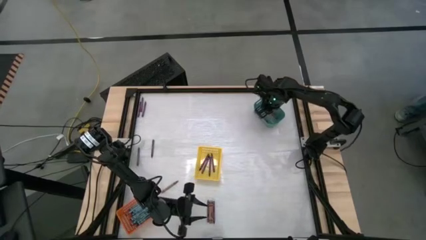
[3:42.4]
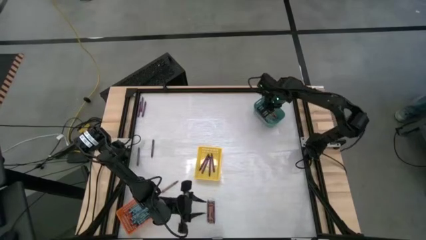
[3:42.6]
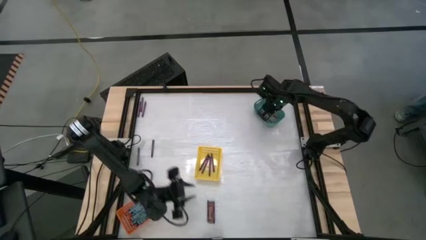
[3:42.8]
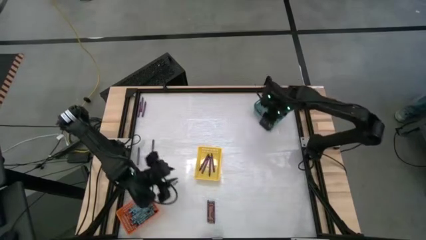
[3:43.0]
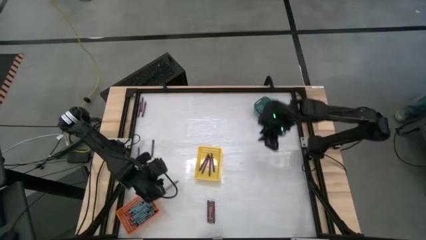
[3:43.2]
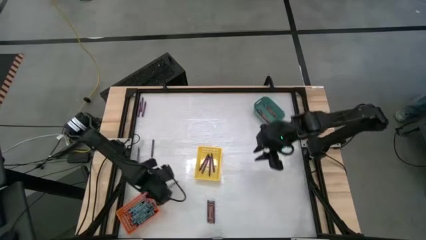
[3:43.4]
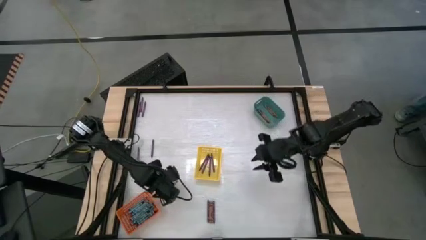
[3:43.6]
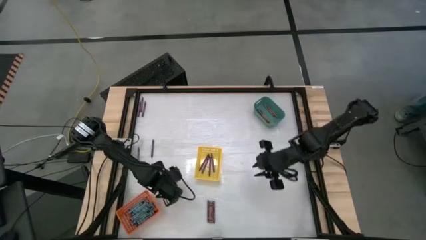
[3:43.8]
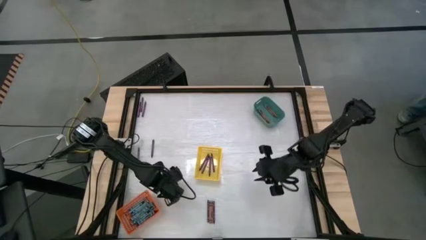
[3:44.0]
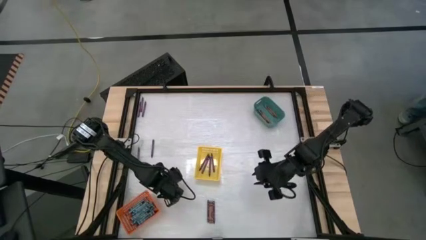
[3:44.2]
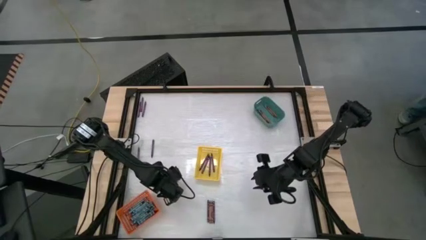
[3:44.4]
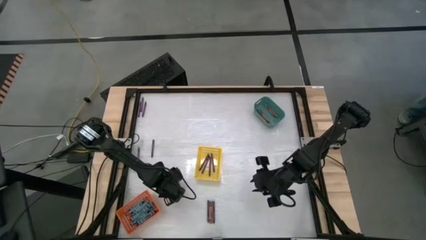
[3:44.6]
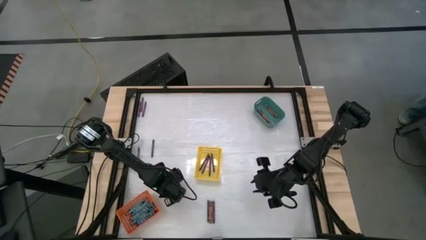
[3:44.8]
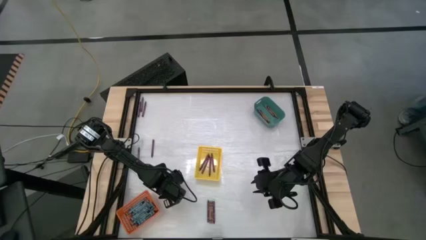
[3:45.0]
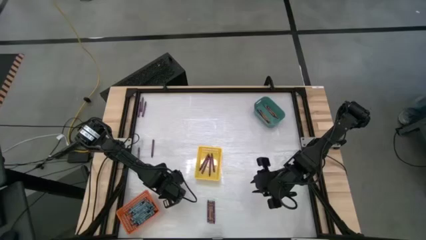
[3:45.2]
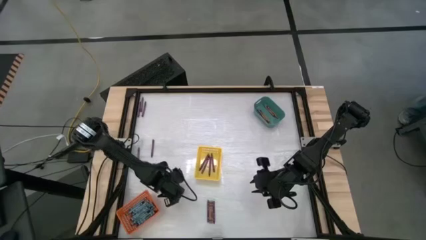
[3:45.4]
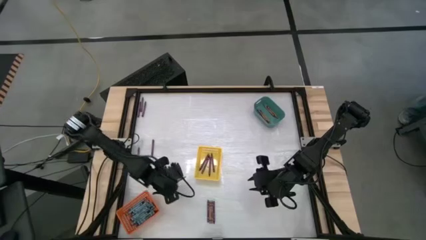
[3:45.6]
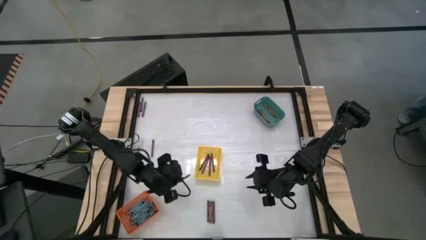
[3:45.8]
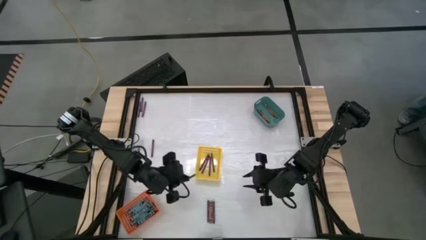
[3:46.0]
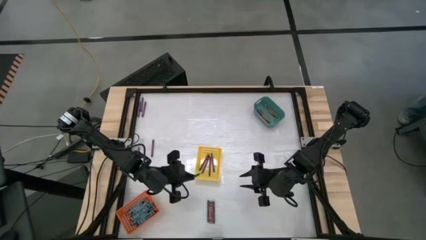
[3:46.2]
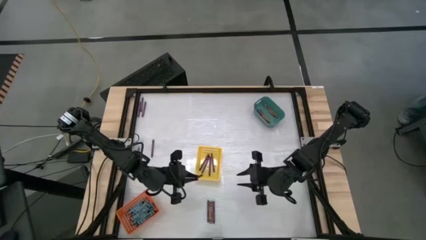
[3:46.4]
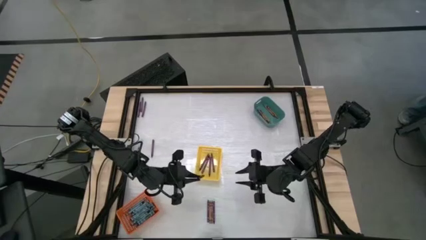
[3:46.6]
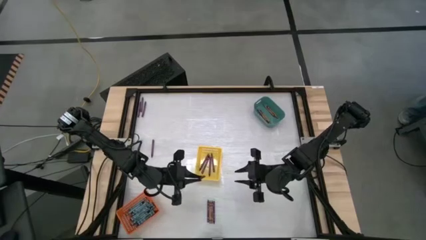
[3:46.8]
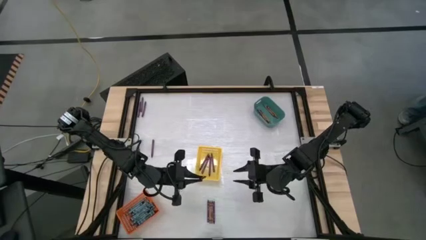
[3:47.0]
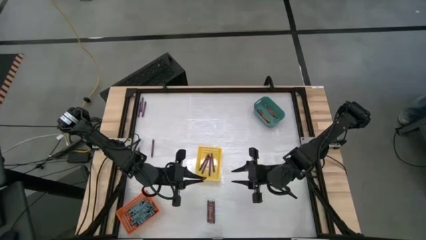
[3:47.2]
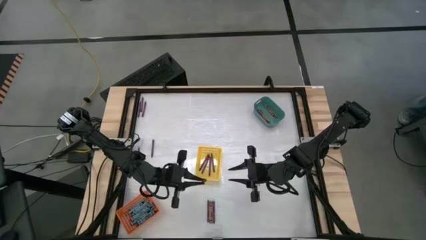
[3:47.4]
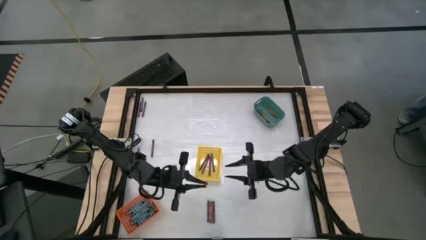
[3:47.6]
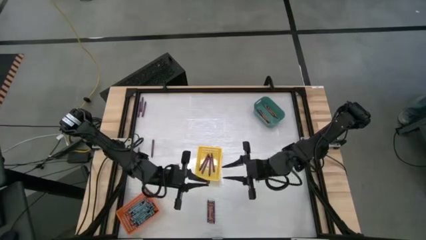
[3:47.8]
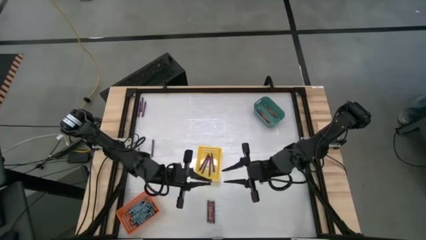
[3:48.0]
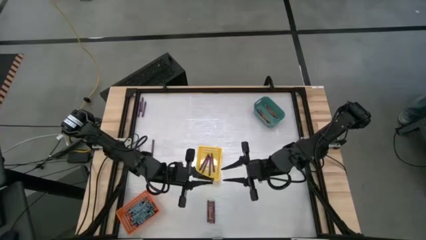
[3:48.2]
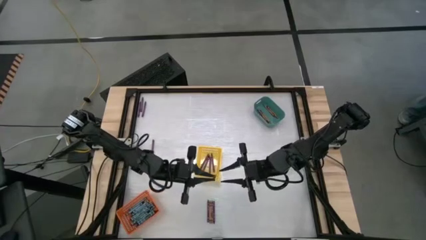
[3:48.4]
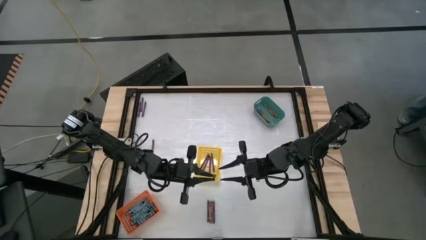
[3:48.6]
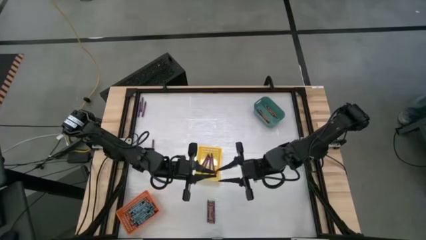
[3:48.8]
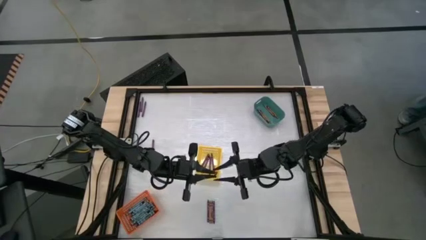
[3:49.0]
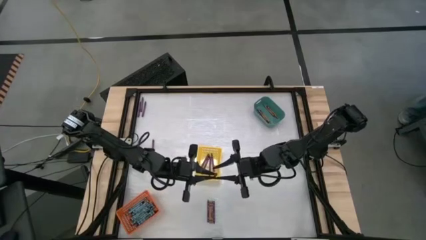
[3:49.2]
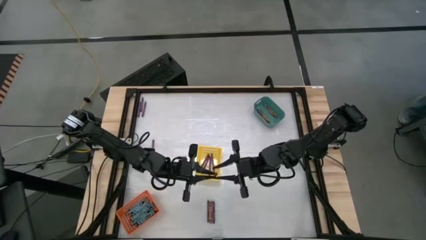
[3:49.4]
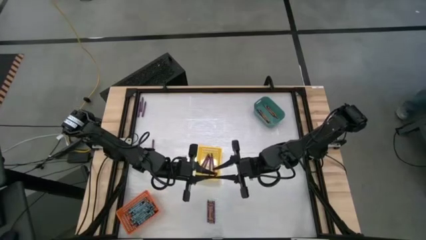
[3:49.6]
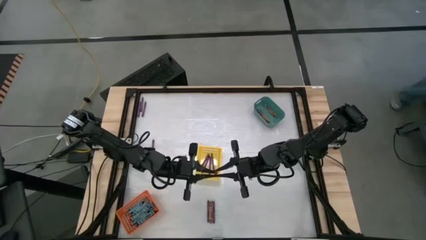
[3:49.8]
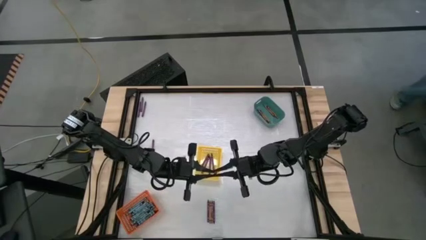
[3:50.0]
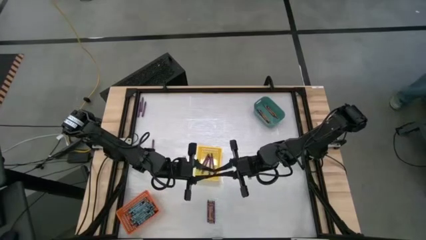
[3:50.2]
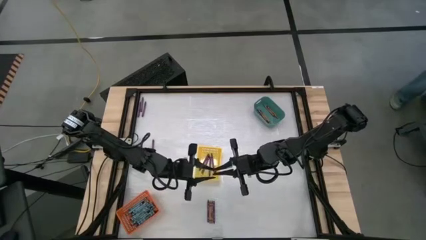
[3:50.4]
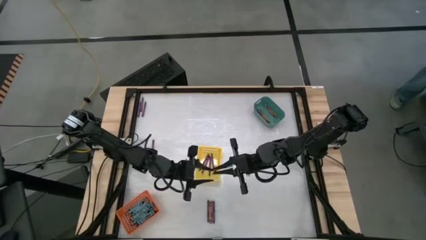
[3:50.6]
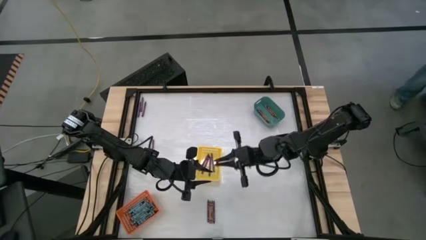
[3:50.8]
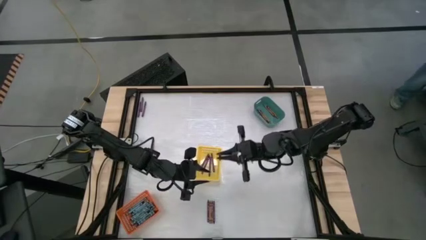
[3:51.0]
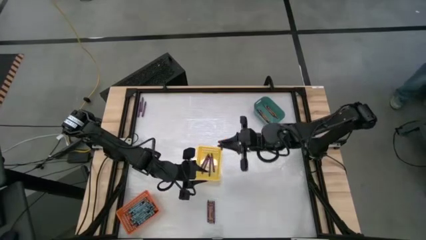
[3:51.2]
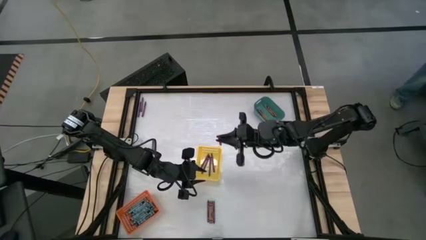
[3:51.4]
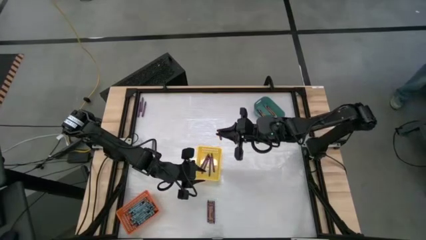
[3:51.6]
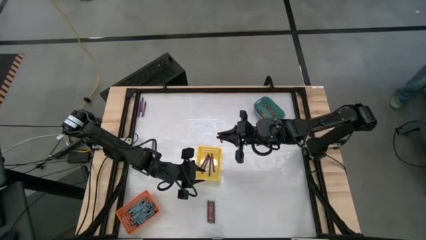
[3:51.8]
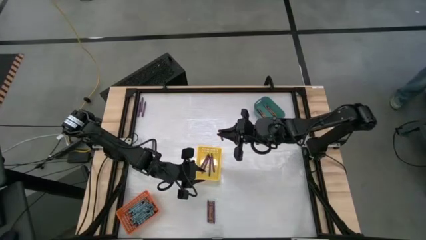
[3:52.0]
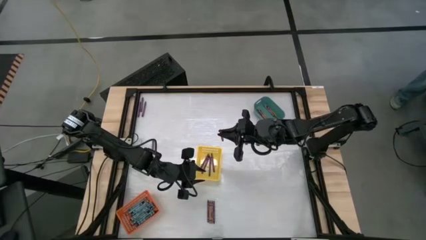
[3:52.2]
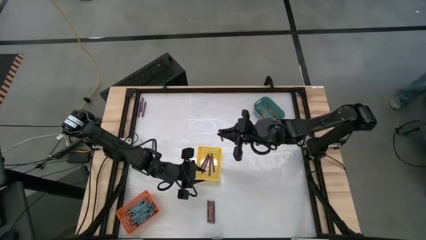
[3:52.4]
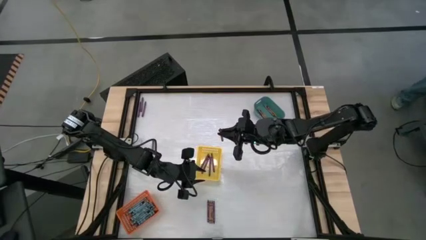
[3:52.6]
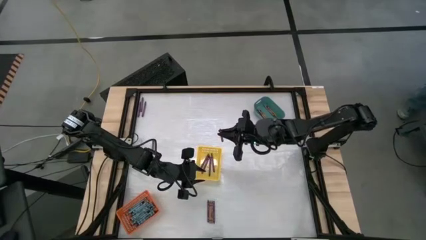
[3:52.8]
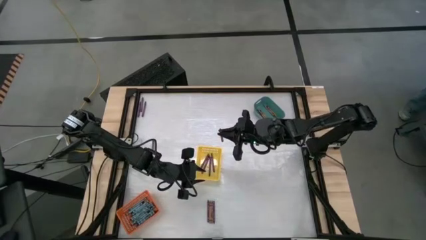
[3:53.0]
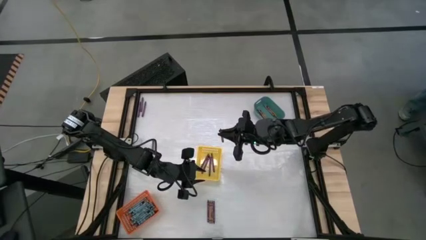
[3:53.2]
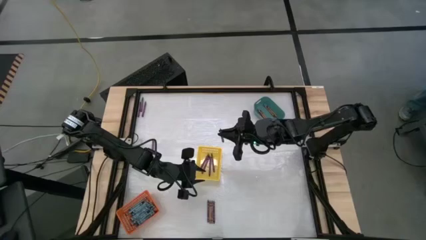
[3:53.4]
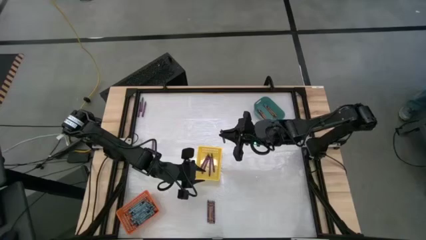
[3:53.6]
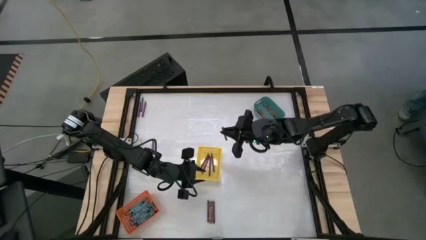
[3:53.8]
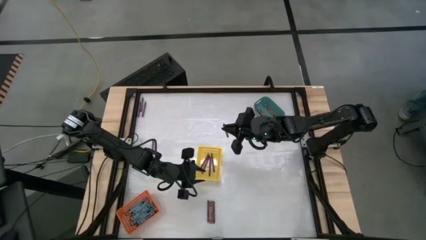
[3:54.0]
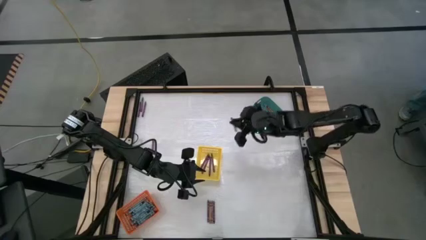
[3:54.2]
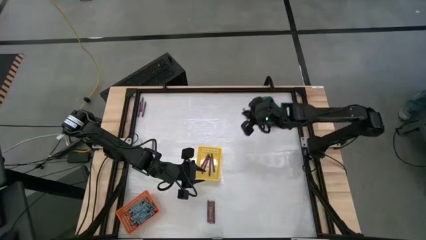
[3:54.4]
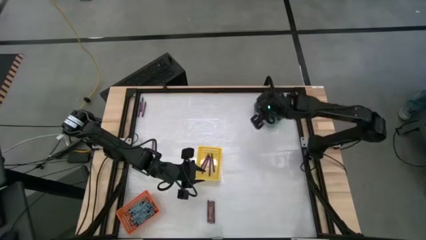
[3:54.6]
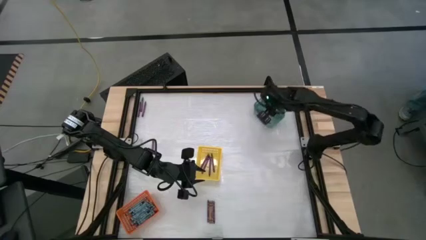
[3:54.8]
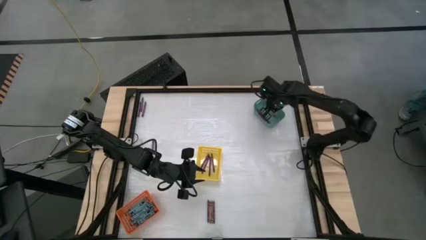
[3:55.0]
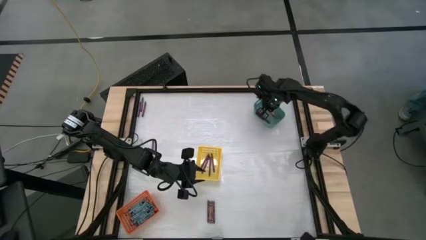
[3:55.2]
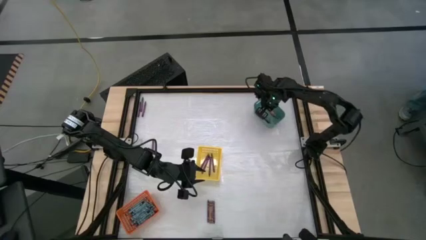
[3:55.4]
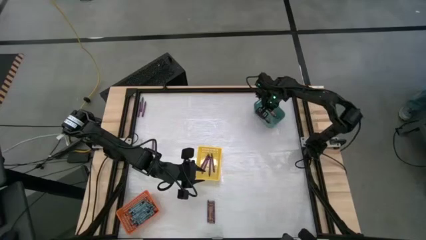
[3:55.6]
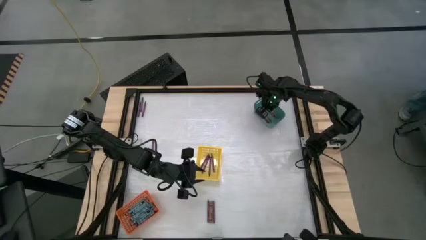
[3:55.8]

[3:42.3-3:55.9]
Task: Sort crayons
Put the brown crayon into the green bin

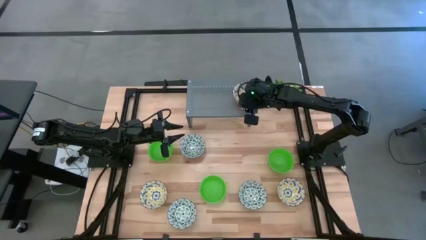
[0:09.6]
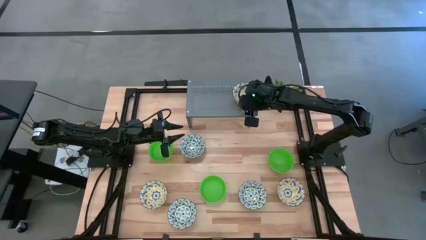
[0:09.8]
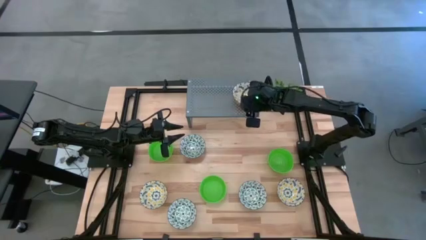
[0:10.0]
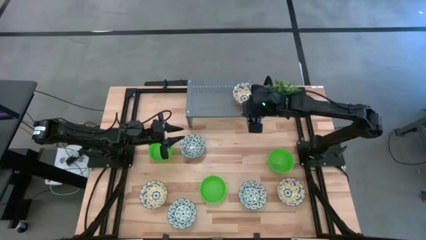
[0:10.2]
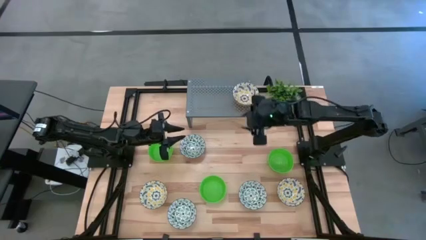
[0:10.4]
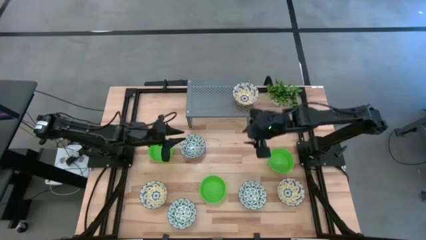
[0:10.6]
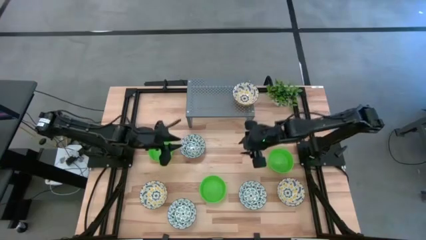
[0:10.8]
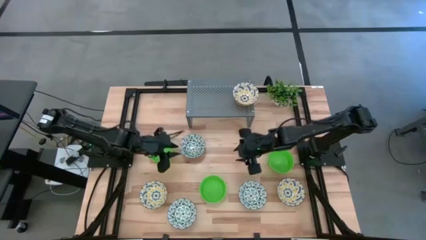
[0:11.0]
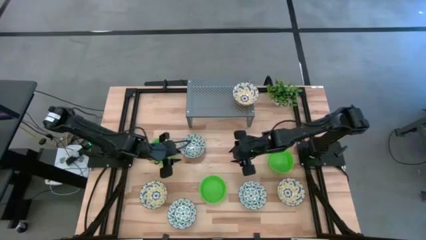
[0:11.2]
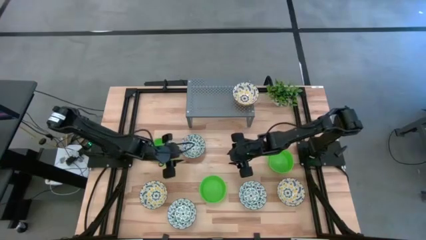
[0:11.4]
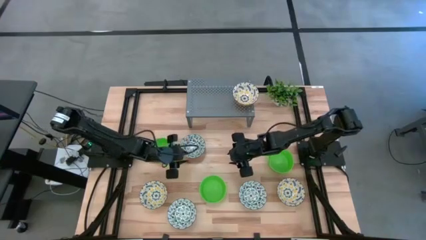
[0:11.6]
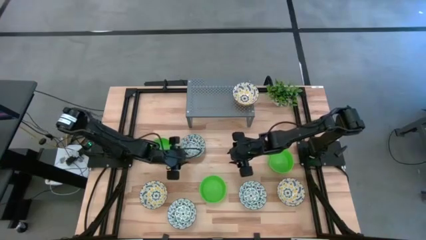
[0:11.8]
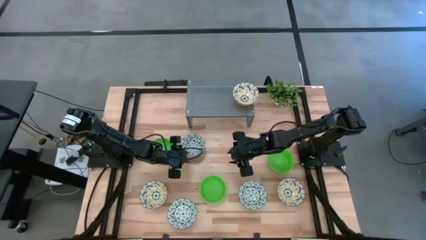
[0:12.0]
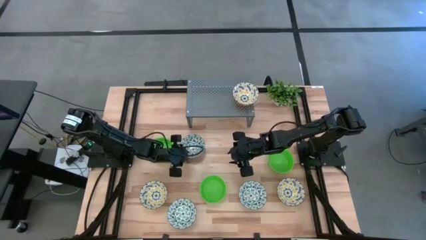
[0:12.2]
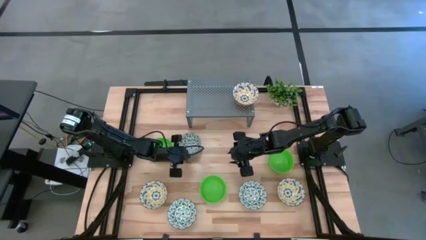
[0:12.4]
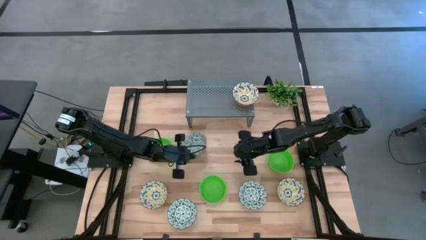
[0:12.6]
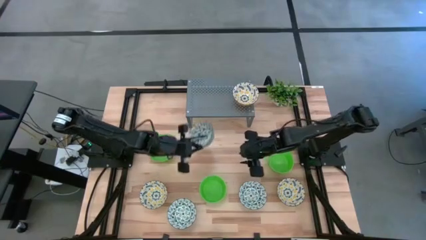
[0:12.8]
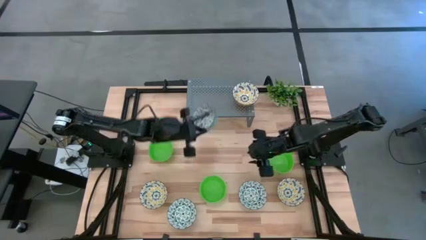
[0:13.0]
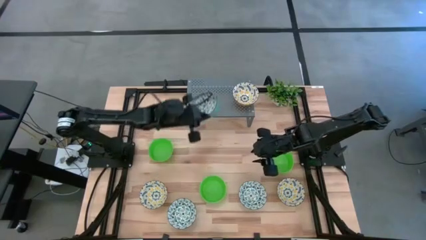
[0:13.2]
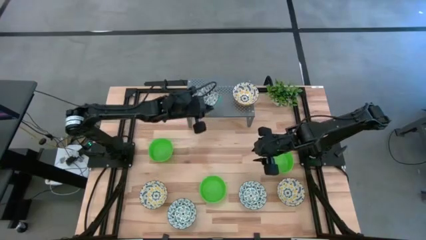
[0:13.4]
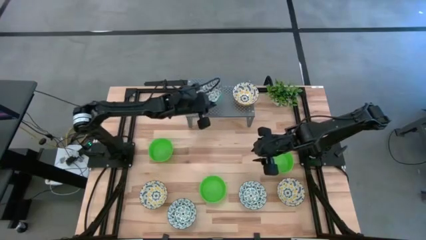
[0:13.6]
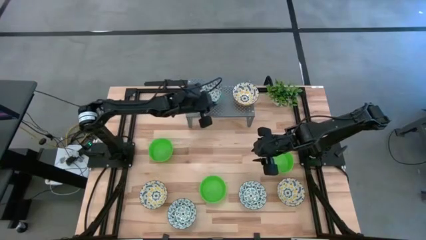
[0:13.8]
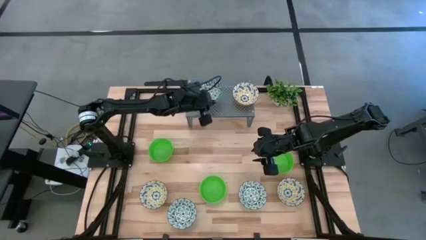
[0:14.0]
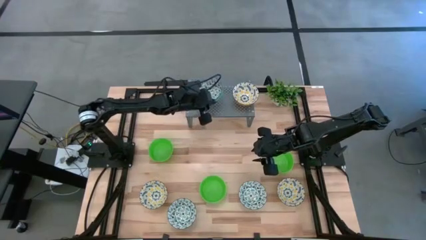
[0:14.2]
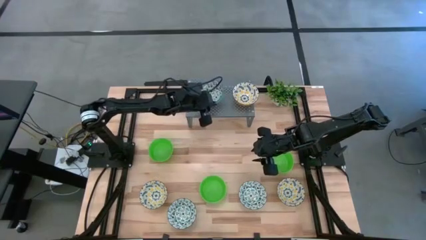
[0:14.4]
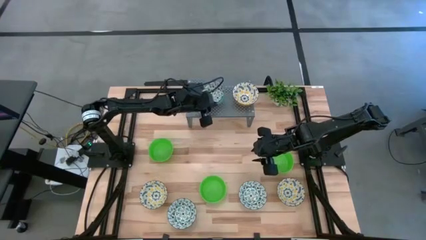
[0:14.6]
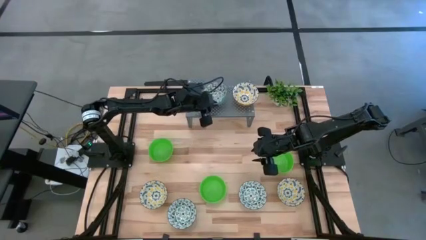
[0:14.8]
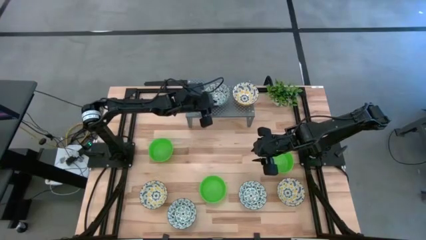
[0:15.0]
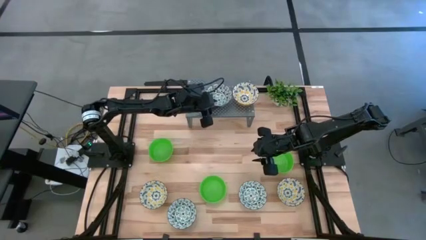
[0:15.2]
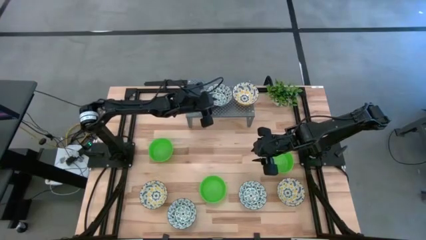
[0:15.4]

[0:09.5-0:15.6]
Task: Pick & Place Mini bowls
Put the top green patterned bowl on the shelf
